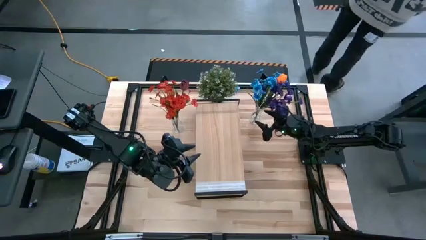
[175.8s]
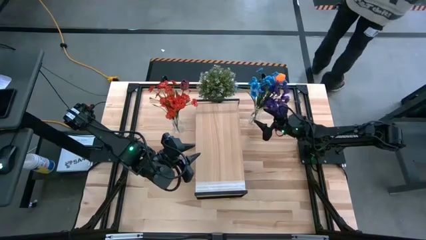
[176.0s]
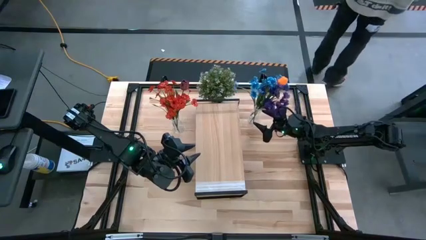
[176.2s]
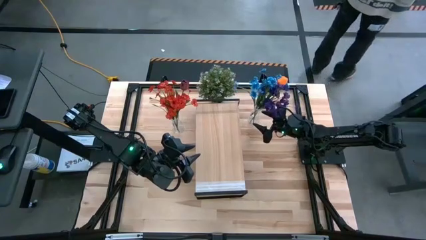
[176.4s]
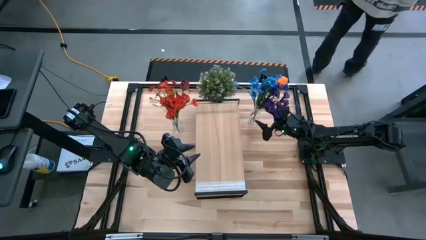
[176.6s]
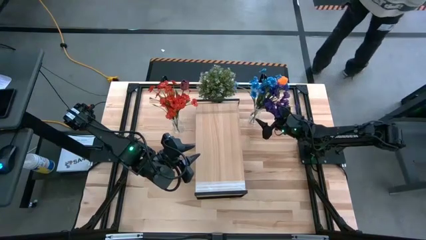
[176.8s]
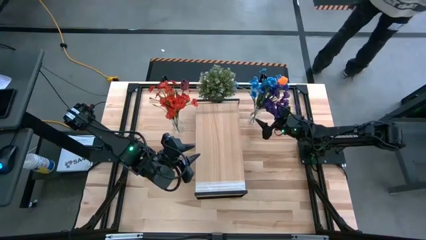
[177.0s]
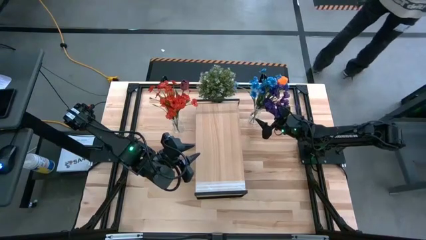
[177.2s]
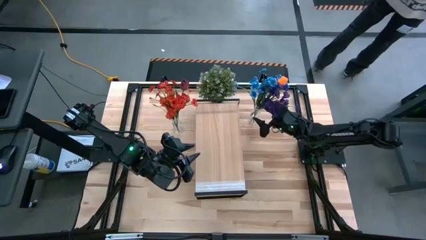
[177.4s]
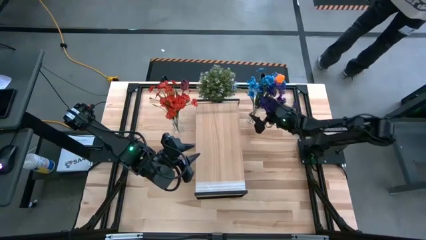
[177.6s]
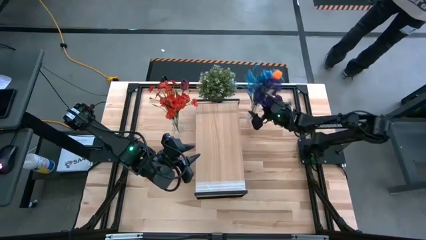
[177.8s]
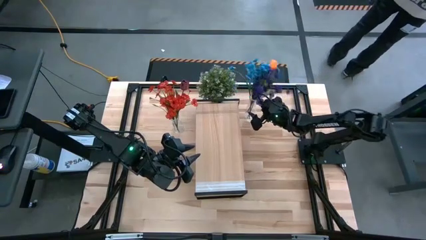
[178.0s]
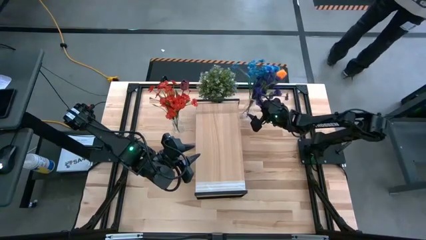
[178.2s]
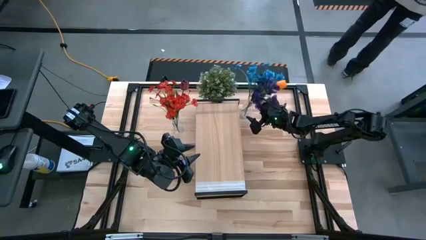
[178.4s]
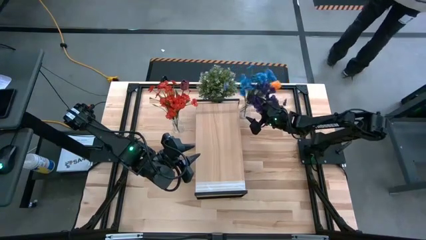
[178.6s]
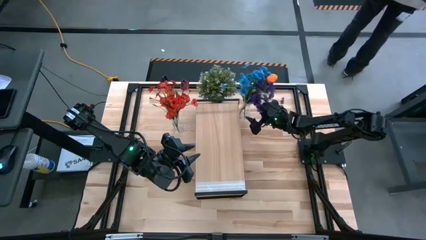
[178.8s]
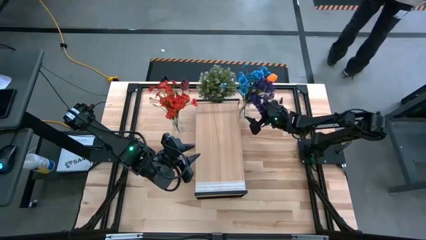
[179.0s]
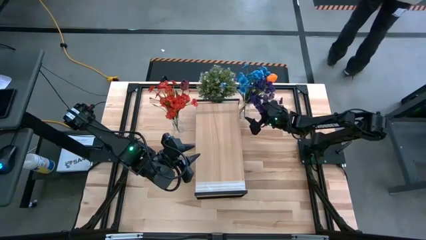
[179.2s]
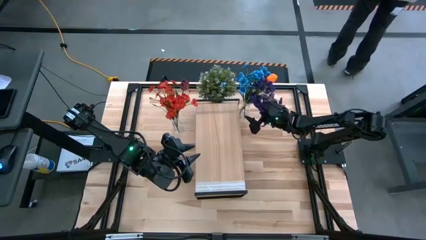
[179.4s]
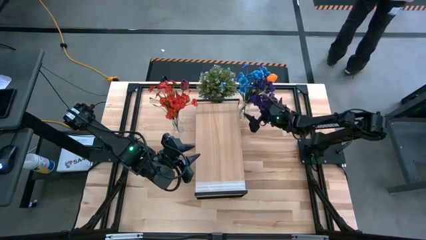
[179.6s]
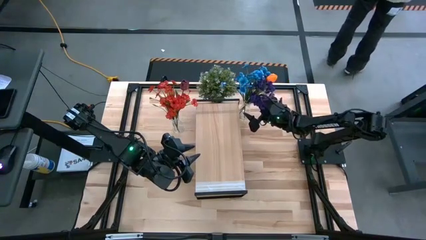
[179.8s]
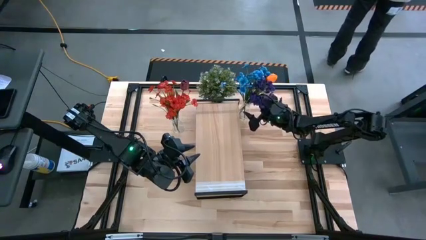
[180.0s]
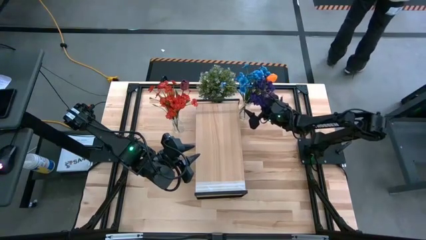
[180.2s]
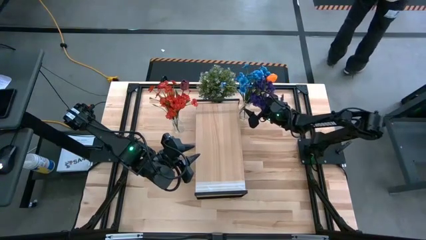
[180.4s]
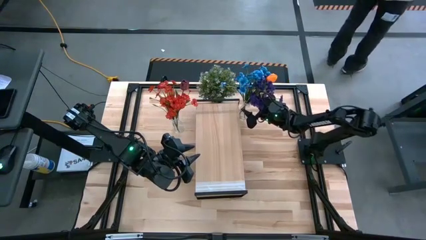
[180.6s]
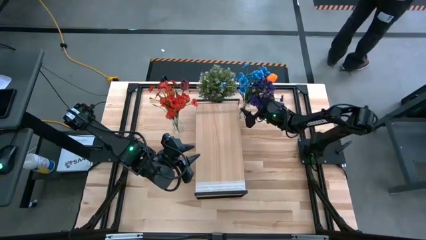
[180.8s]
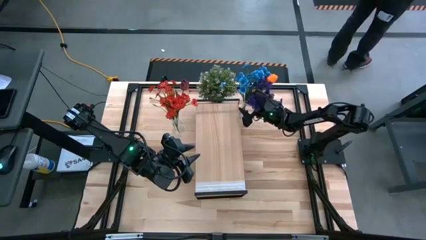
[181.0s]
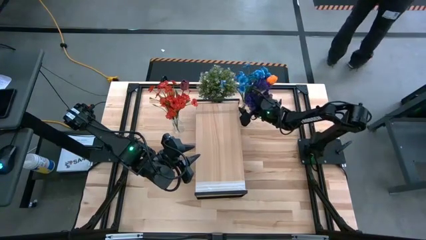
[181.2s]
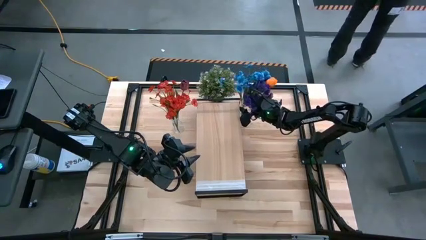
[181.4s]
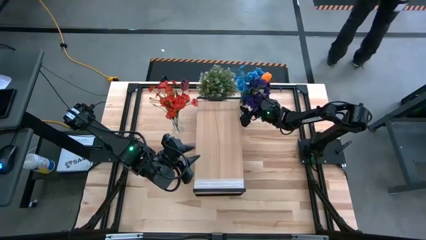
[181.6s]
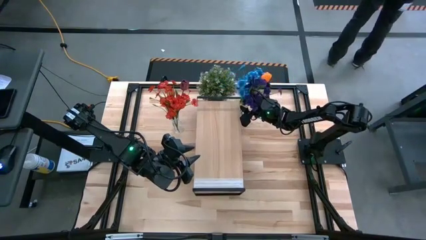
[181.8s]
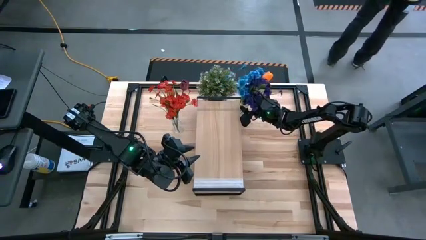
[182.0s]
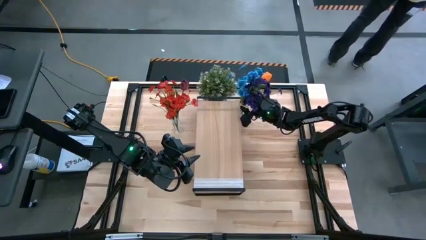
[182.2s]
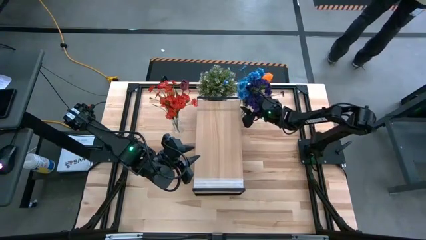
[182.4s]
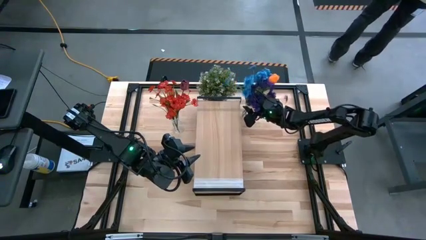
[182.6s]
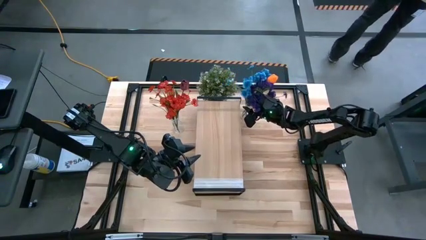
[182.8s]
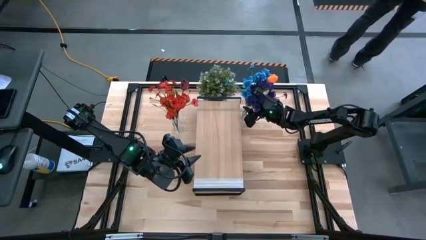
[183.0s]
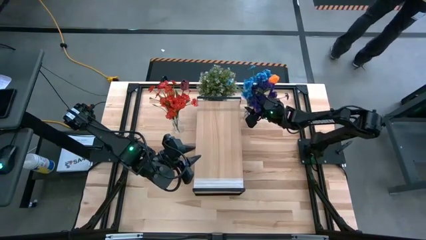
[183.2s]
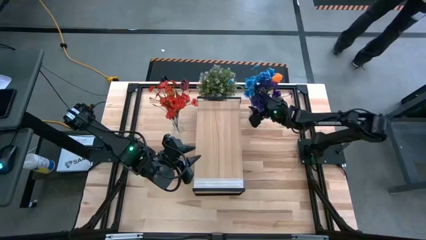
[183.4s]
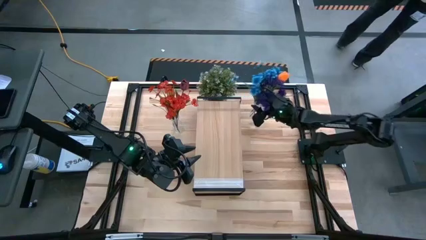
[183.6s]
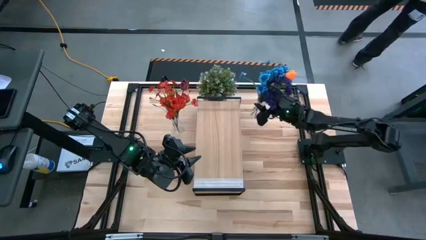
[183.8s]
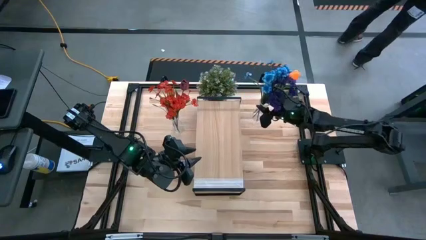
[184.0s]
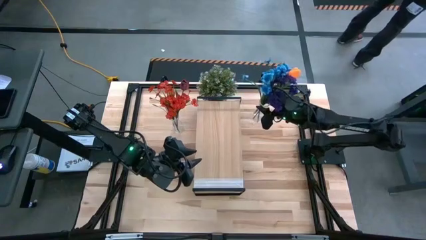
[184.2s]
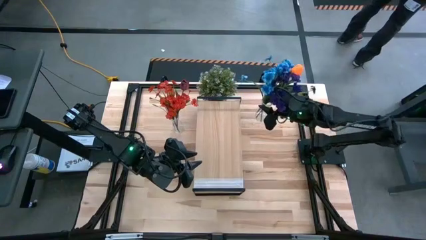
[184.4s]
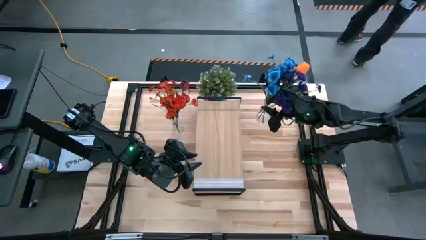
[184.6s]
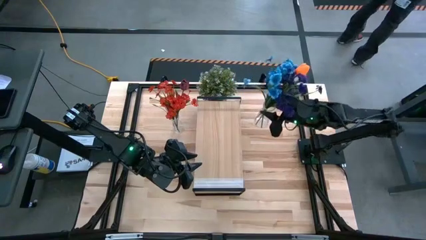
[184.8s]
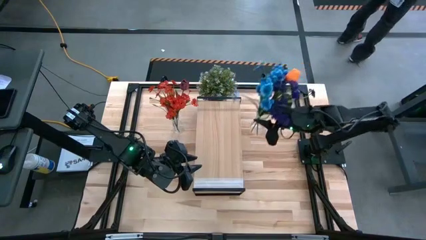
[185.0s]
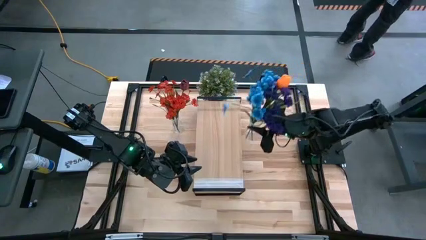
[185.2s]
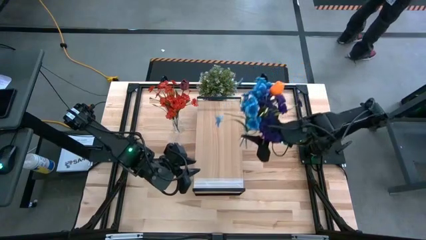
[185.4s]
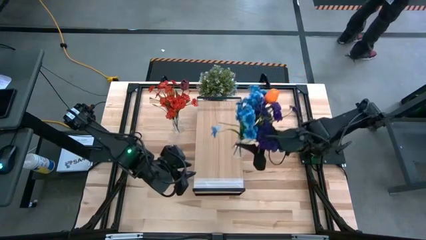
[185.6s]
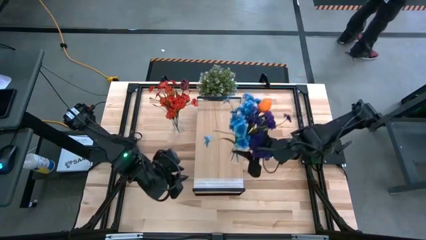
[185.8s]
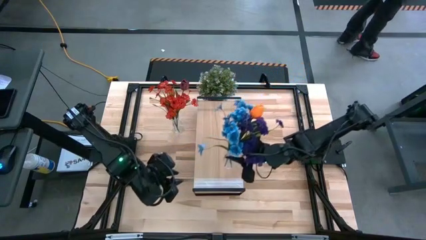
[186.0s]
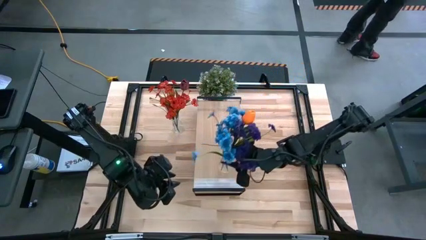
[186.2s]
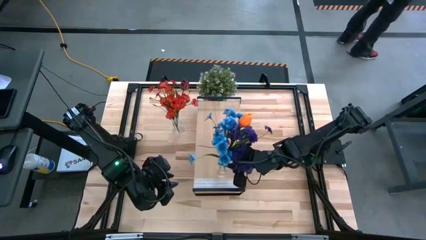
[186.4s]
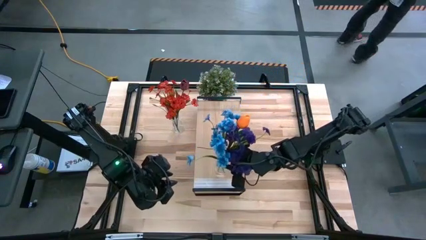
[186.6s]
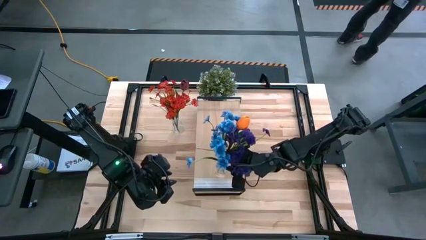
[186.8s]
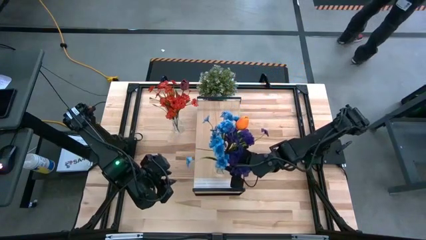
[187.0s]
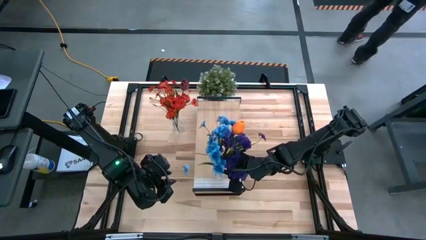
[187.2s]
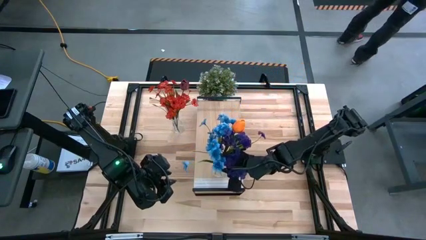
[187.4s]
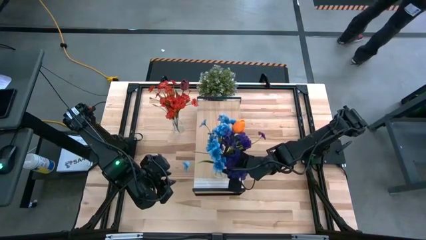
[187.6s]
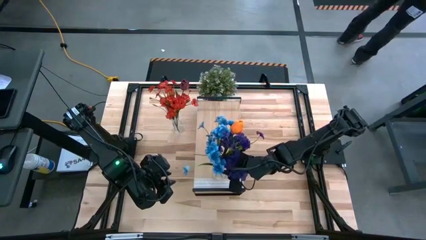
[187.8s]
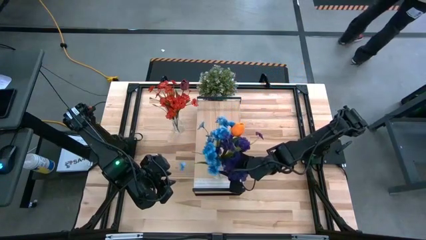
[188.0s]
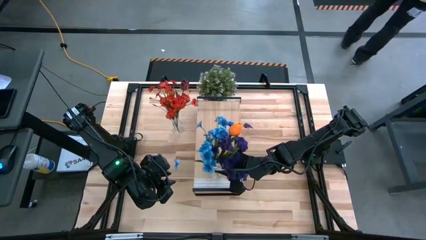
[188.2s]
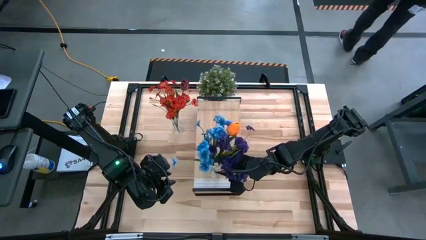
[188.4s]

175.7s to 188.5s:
Task: Pick and place flowers into a vace then onto a shelf
Put the right transparent vase on the shelf
